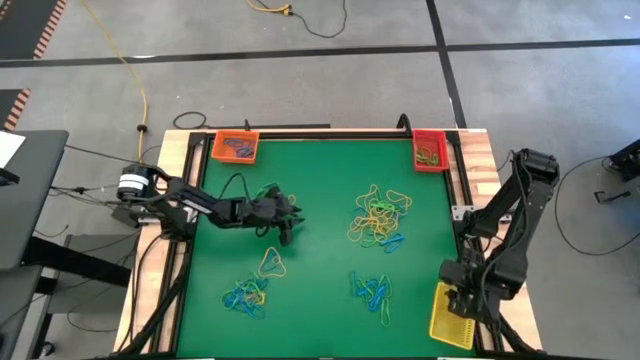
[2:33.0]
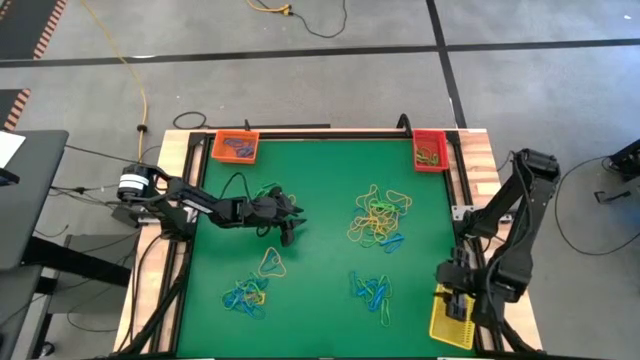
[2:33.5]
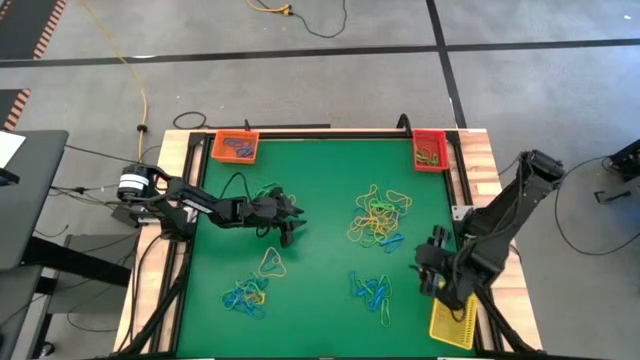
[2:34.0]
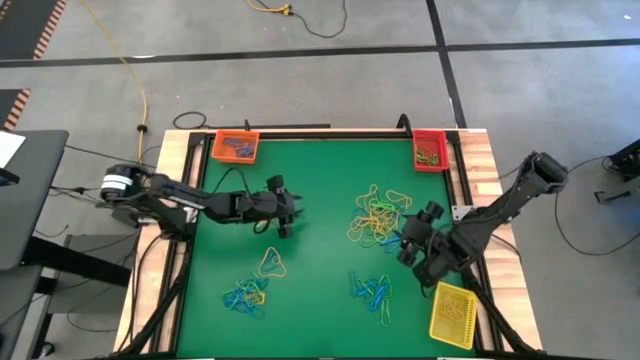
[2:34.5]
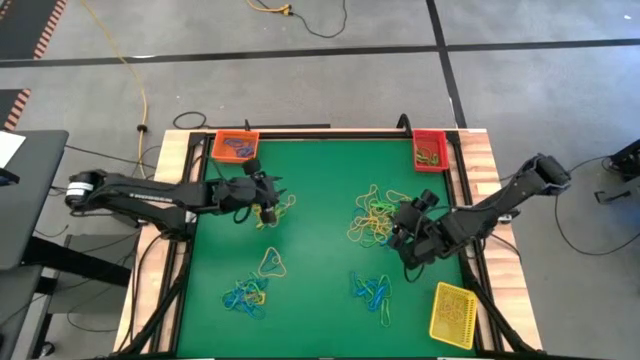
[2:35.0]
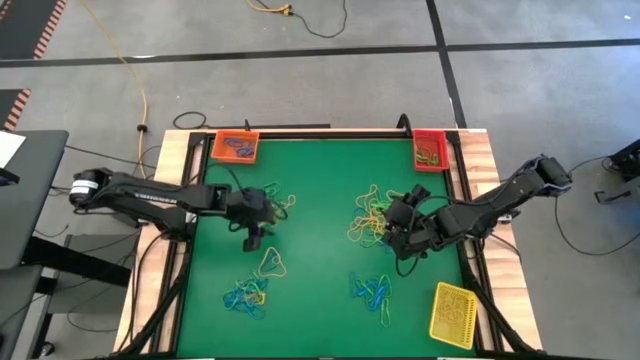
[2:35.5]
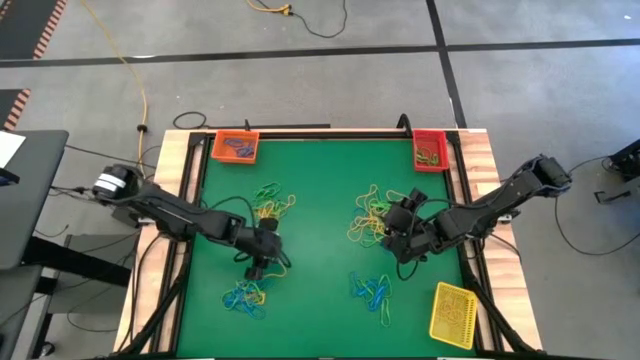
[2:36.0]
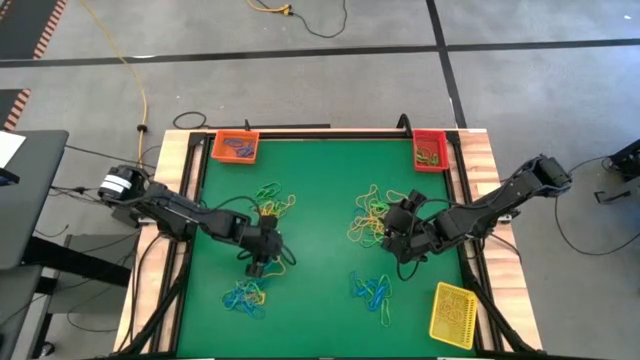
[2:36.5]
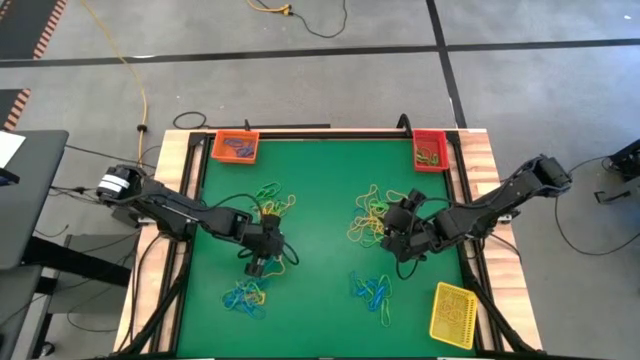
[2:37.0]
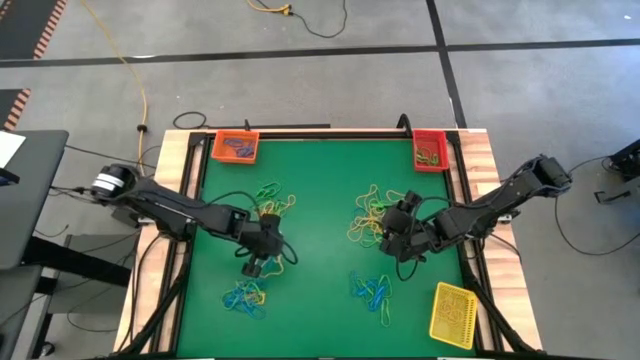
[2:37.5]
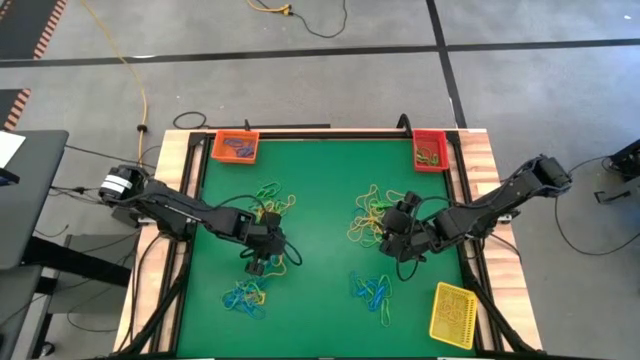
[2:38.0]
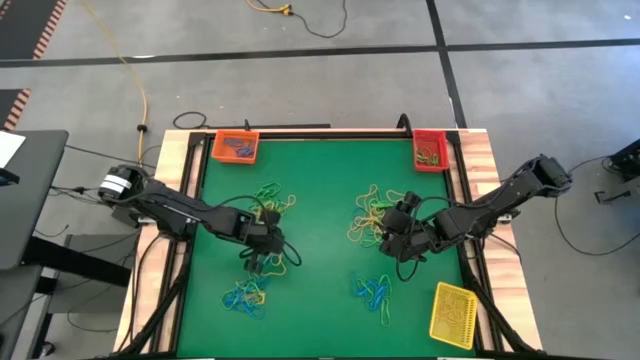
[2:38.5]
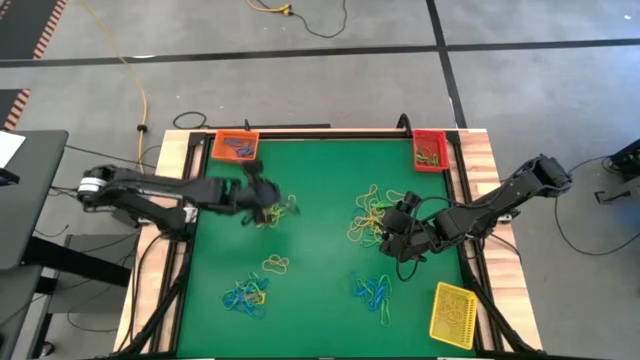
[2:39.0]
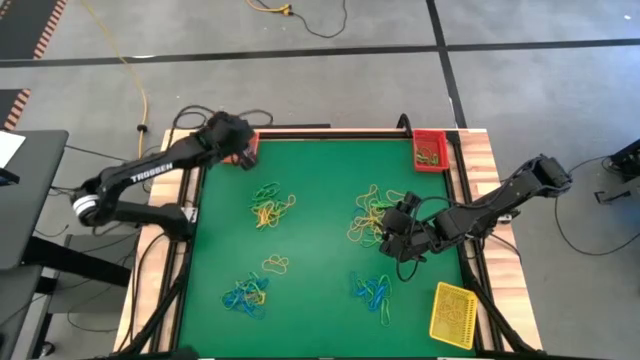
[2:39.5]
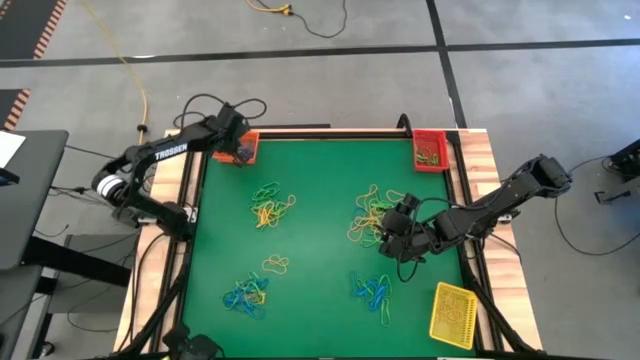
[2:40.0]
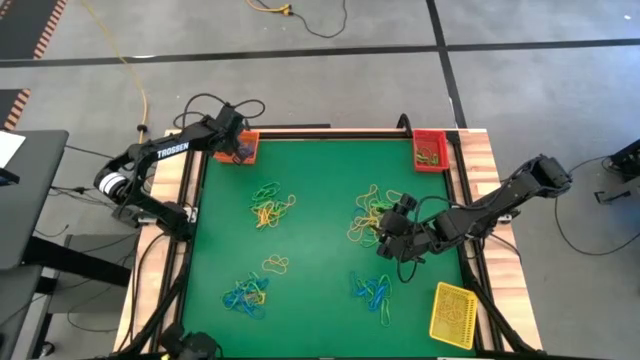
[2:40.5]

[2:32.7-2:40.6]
Task: Sort rubber bands into baskets
Put the bottom left blue rubber band into the orange bin

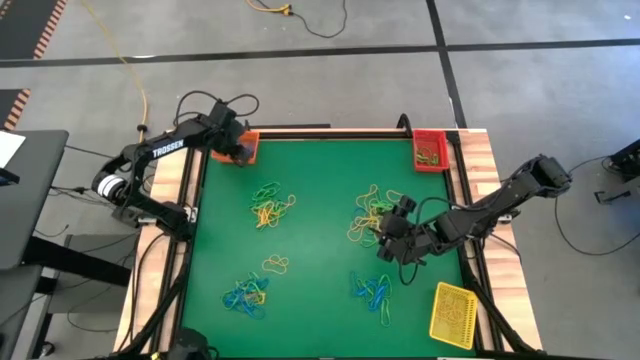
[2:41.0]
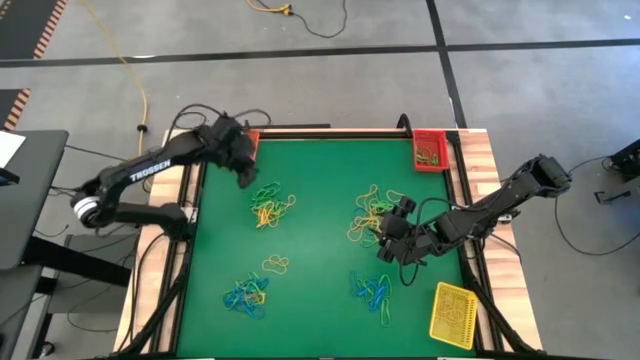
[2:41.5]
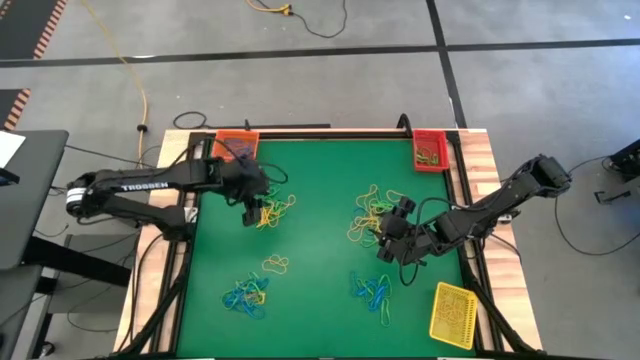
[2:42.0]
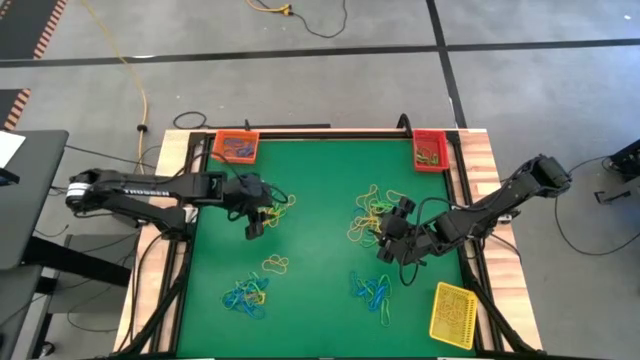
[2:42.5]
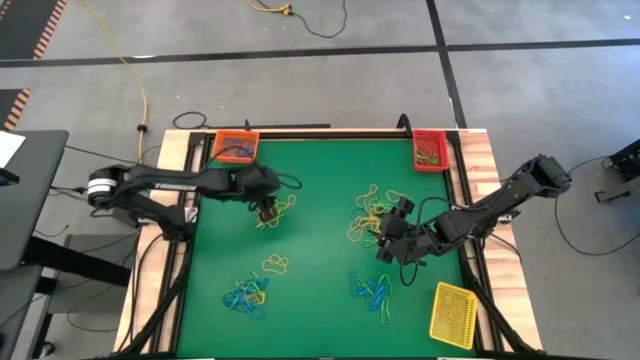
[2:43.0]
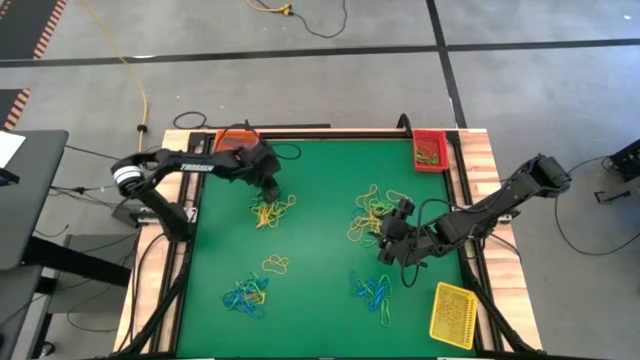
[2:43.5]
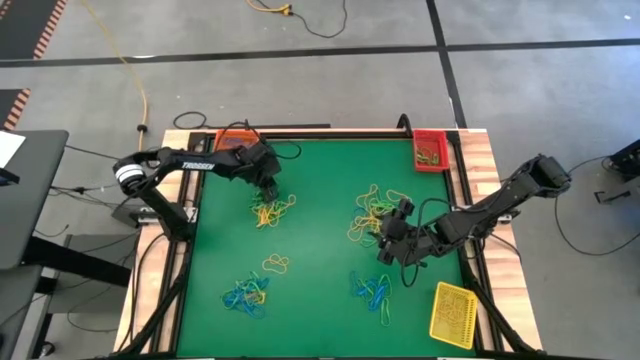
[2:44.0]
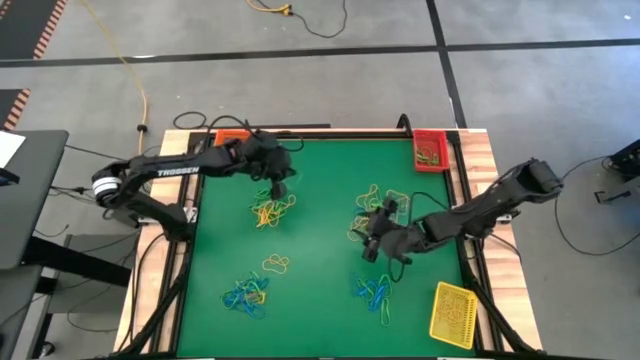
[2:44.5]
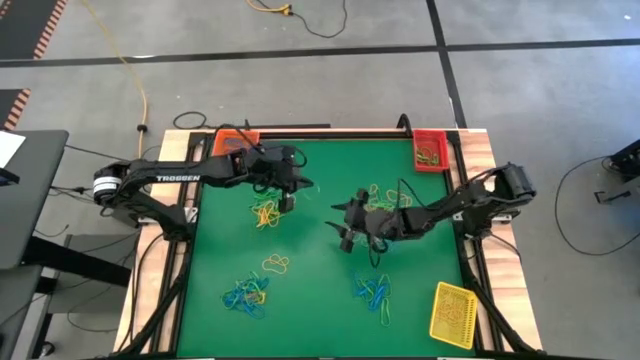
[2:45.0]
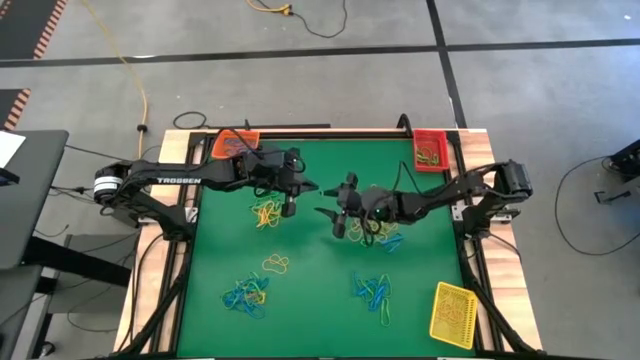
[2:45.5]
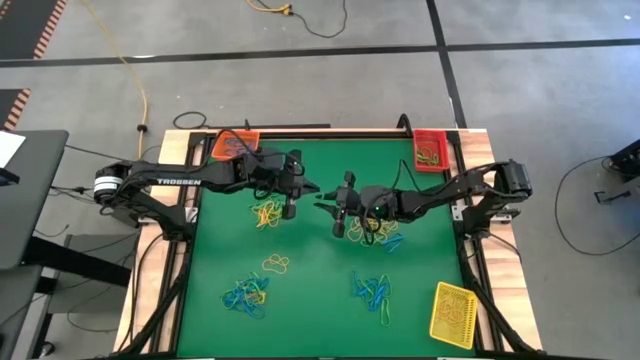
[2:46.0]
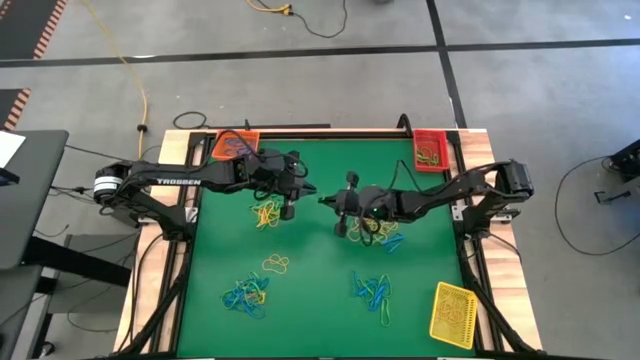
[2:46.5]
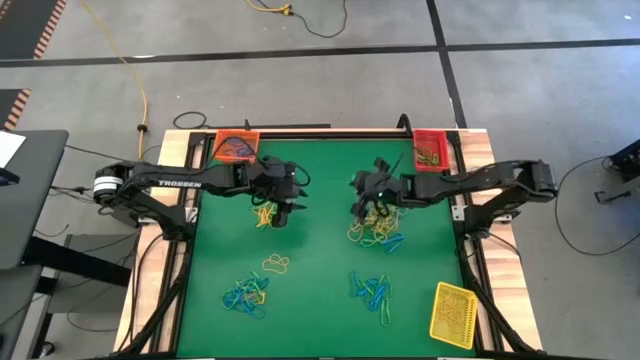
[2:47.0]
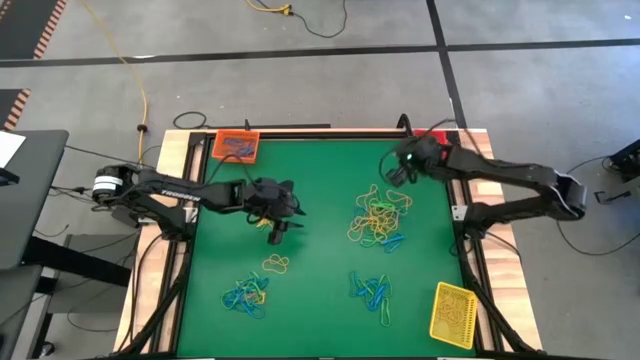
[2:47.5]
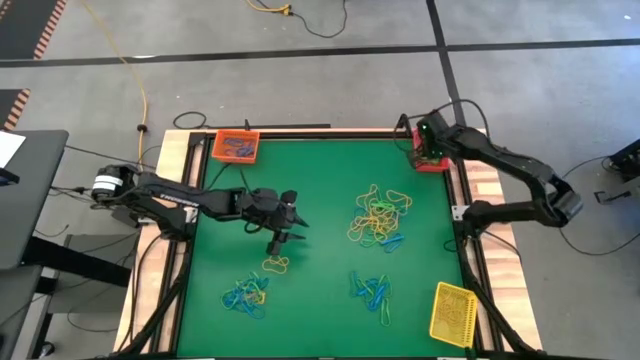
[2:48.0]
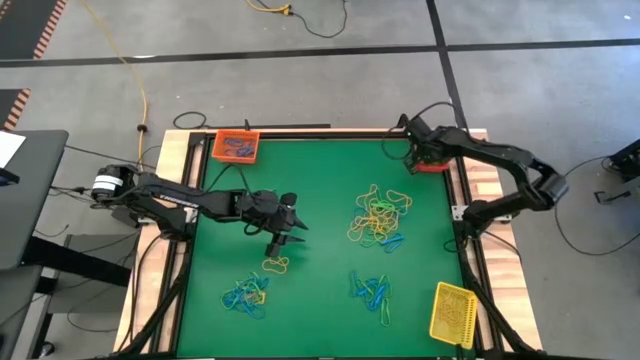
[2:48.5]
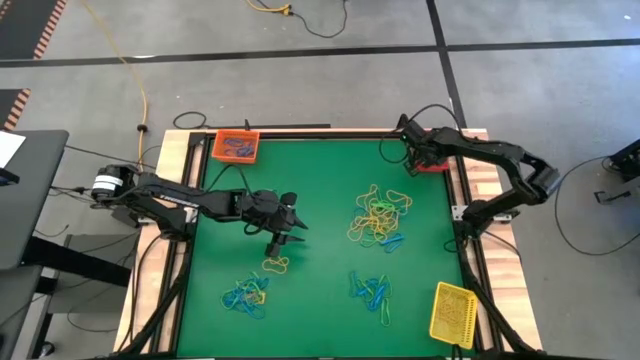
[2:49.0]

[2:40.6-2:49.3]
Put the top left green rubber band into the red bin
